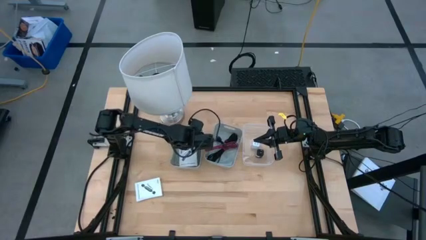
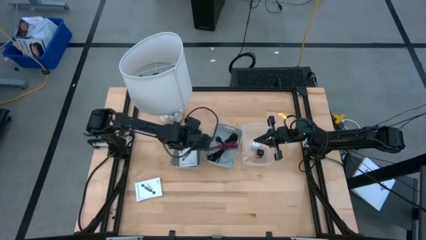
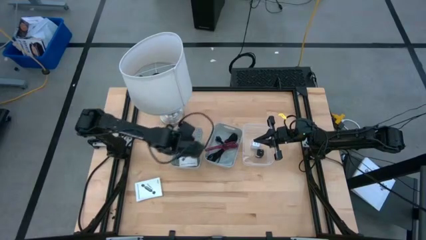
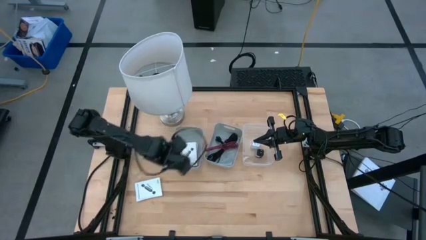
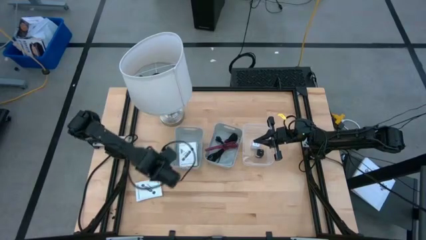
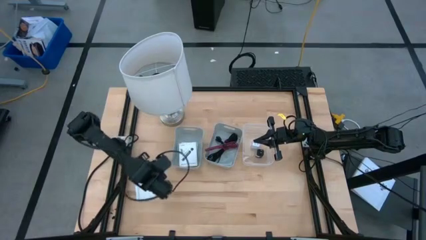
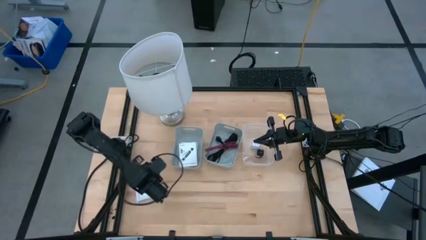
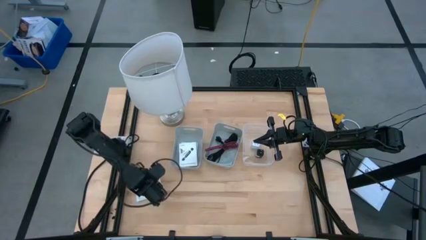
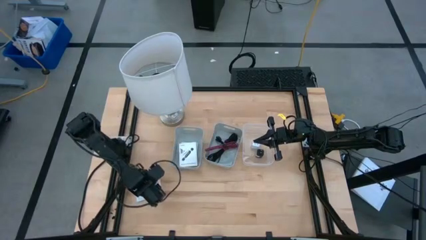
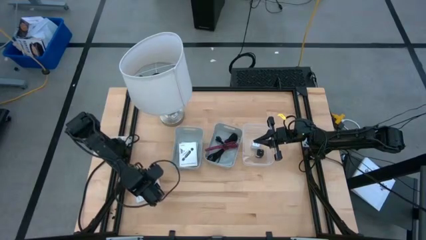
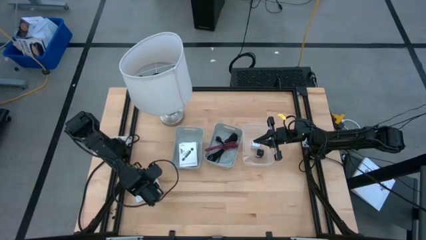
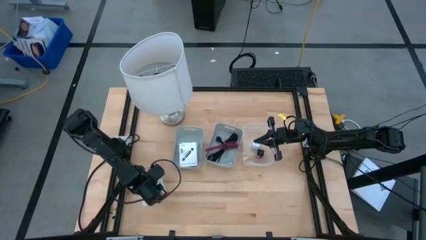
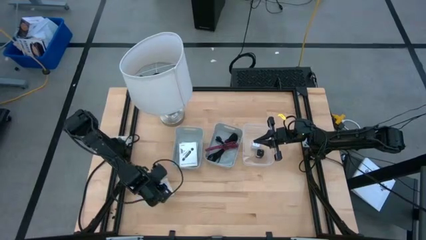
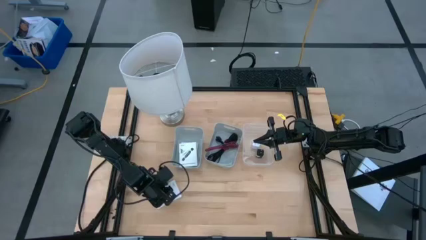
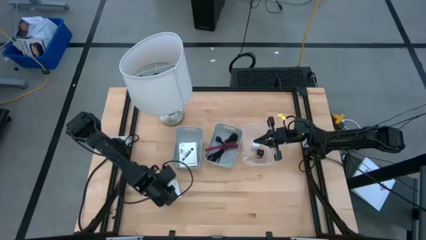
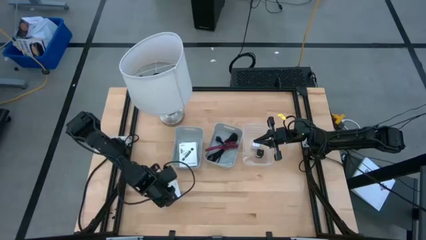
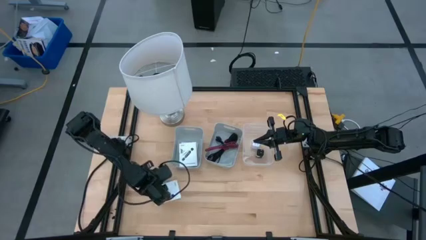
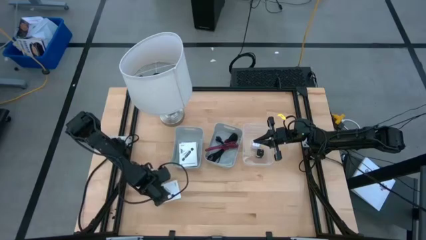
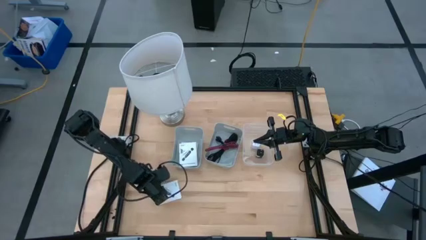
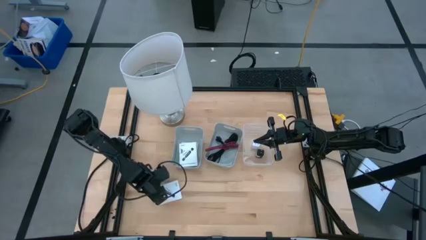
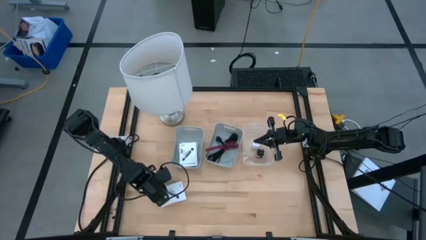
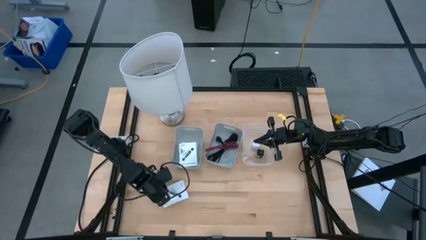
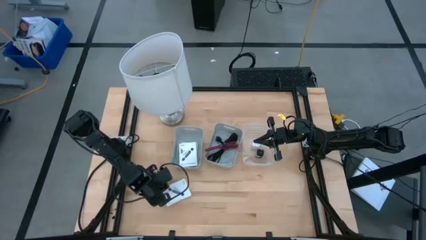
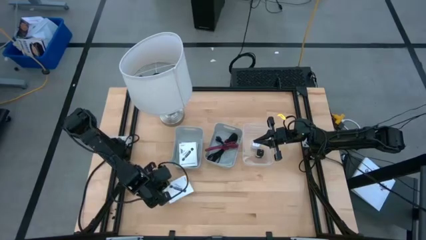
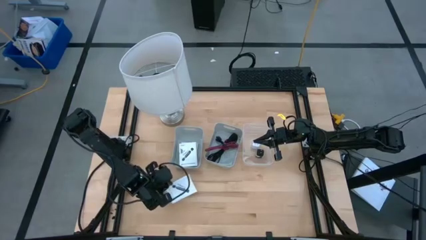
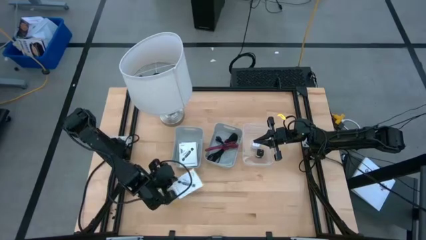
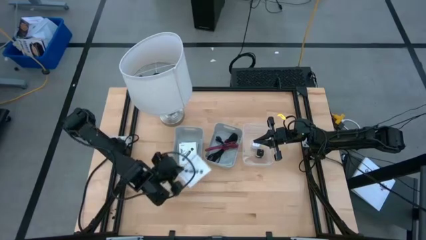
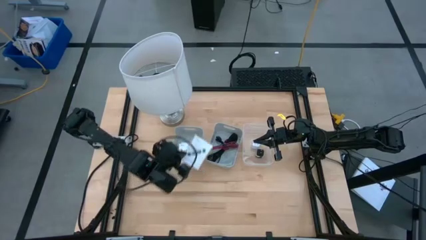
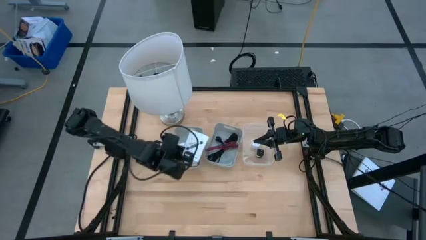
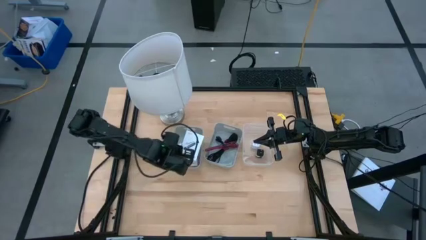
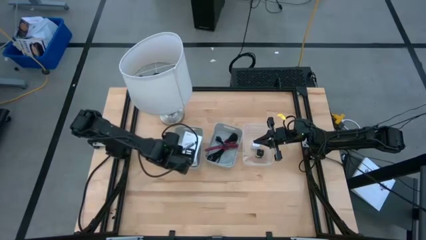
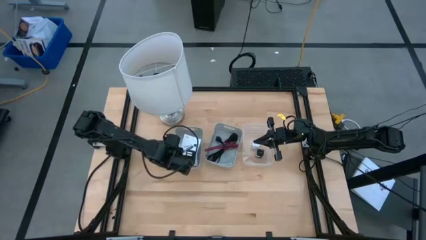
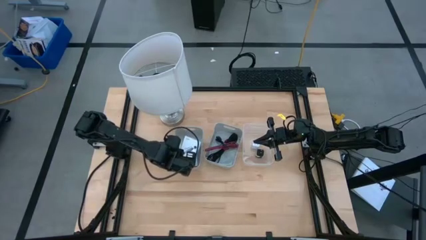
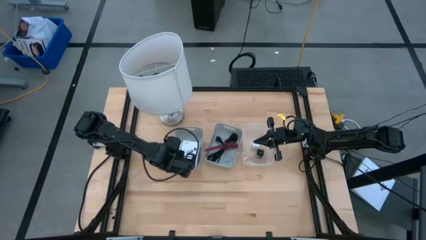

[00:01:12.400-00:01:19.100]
Task: Pick and place items into bin
Put the card reader box into the left gray bin

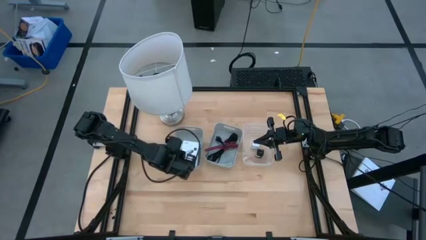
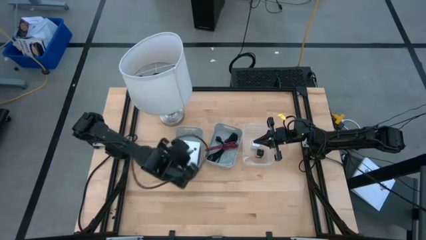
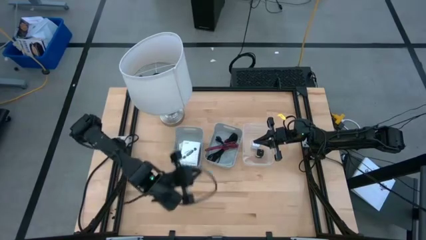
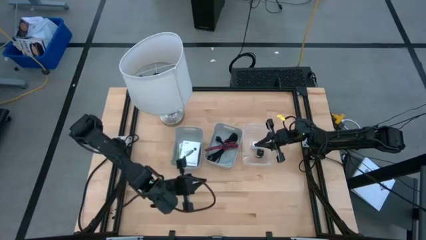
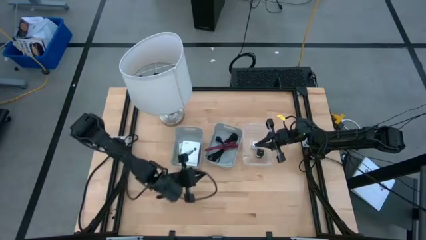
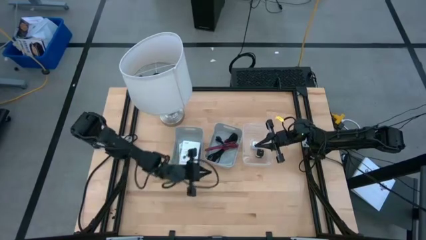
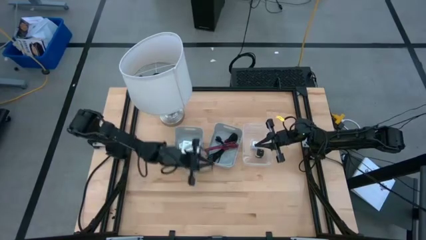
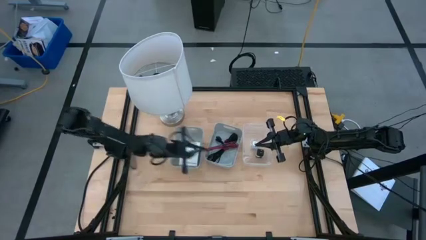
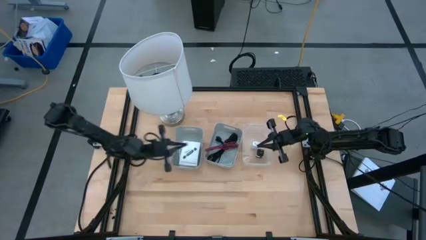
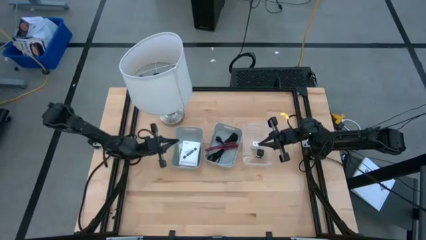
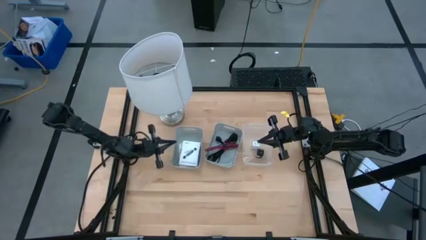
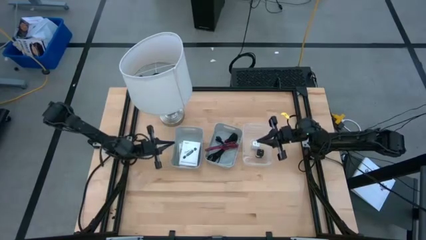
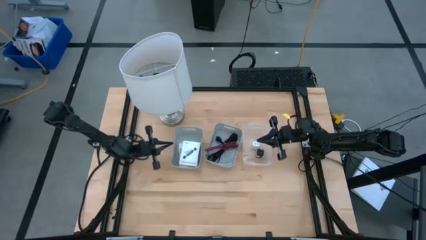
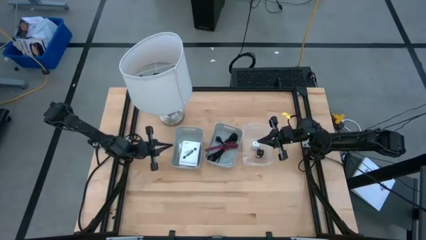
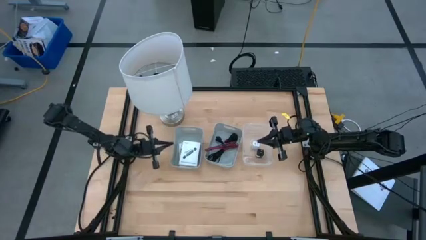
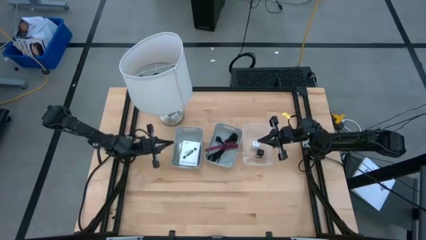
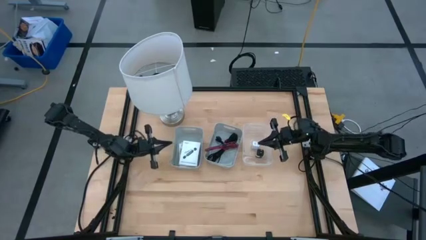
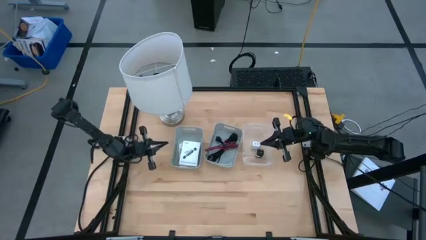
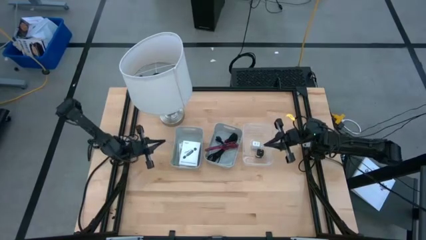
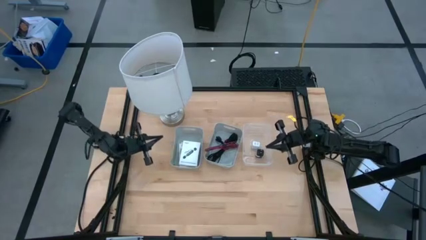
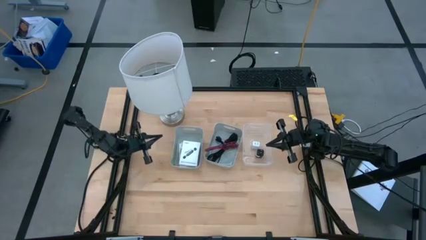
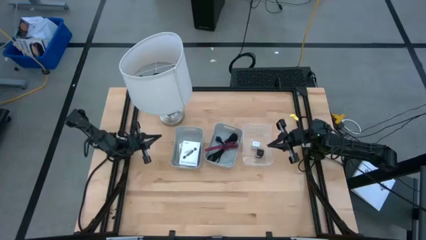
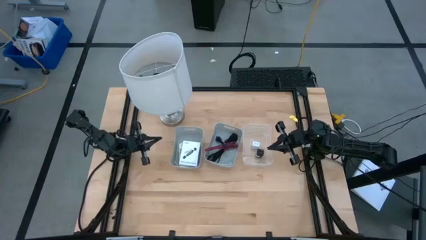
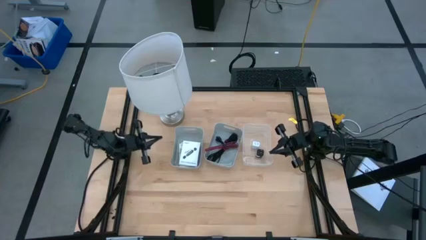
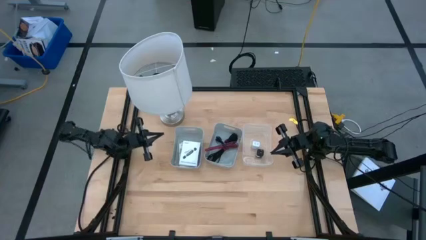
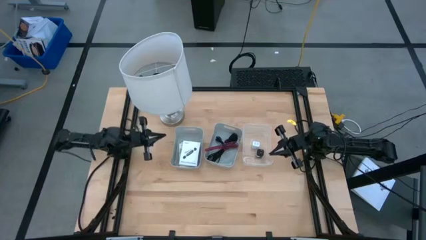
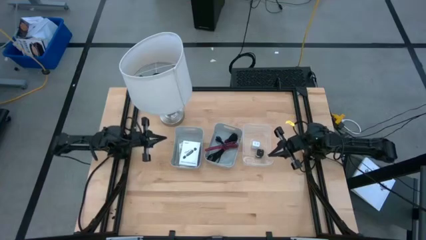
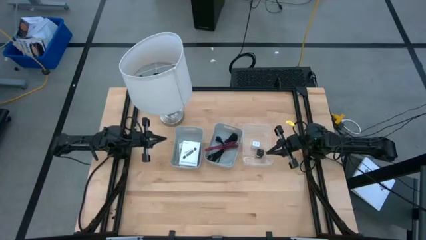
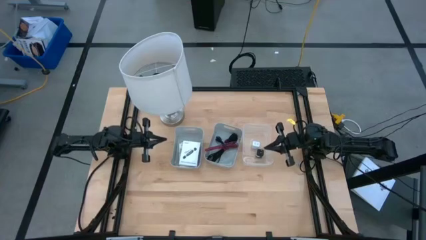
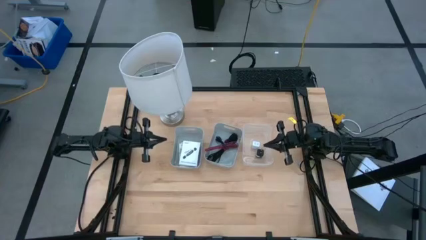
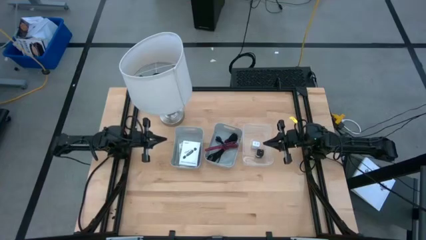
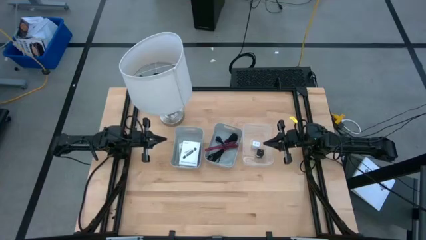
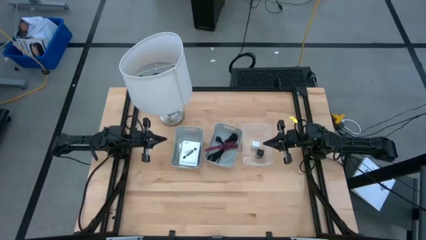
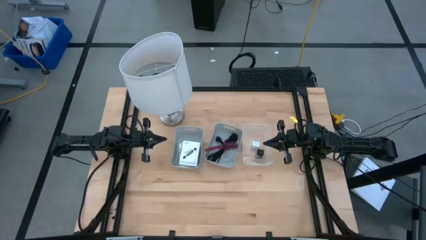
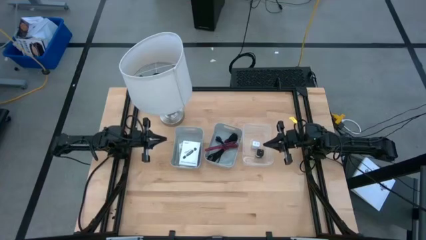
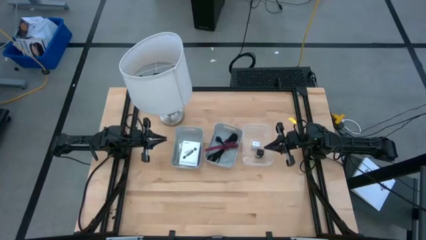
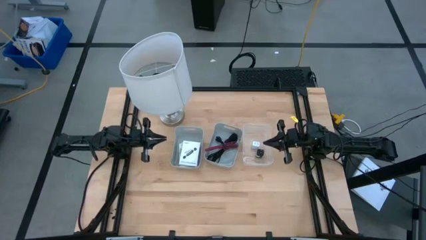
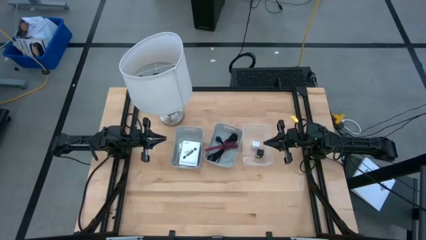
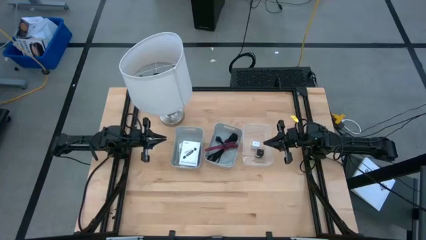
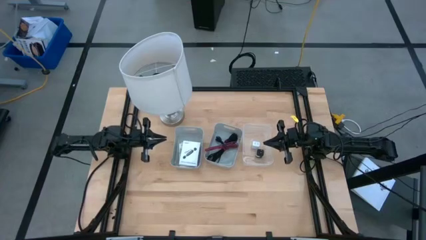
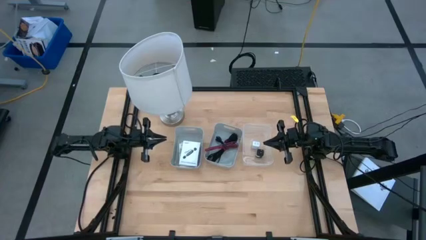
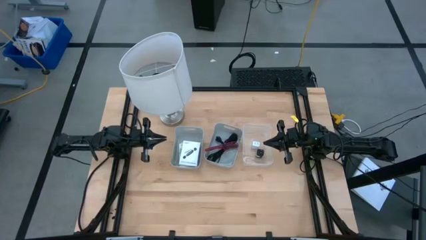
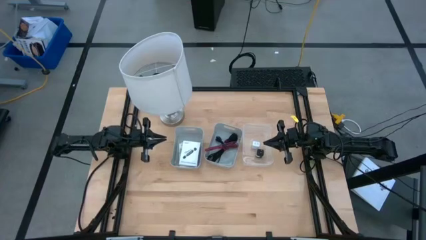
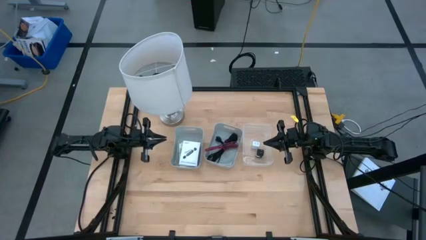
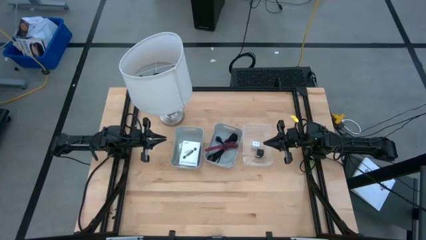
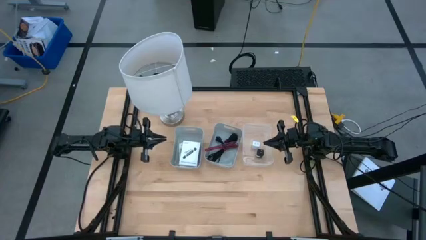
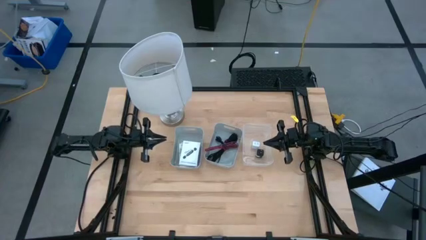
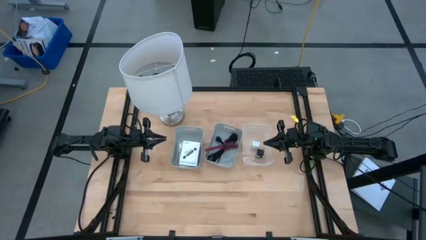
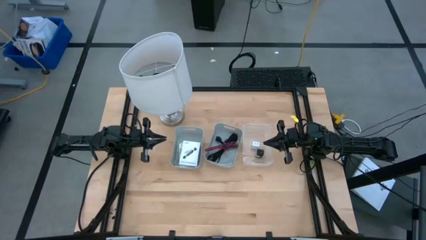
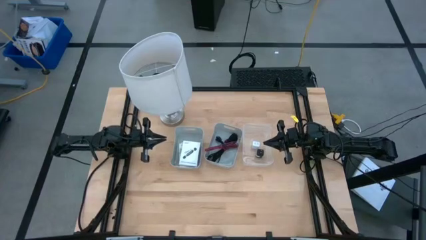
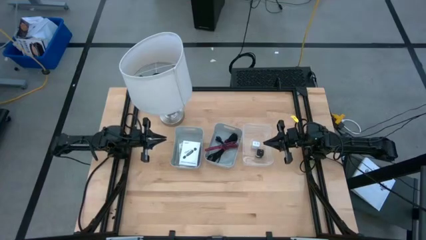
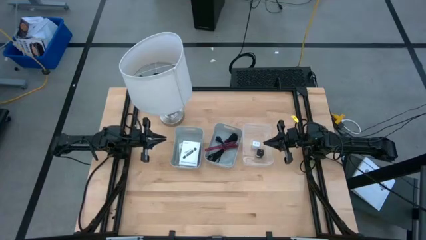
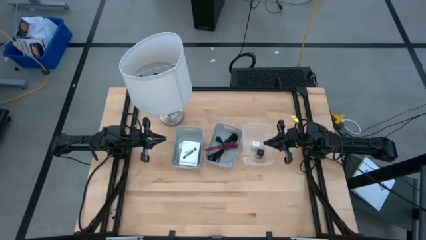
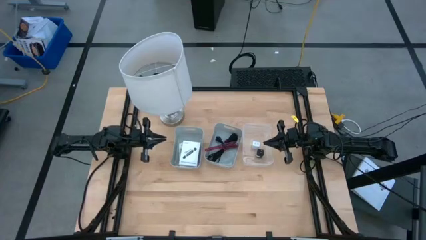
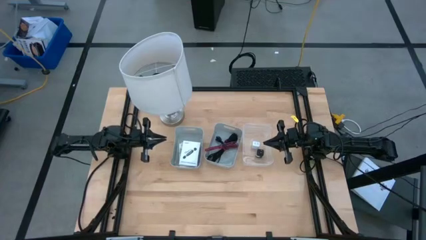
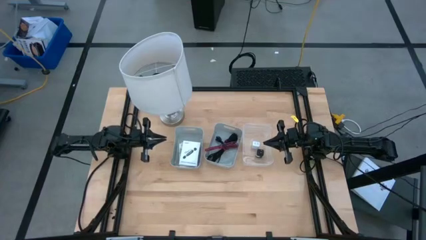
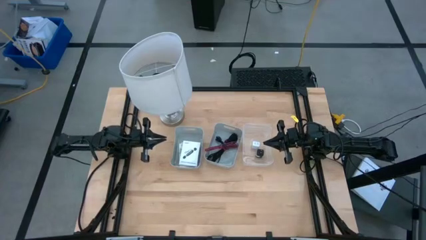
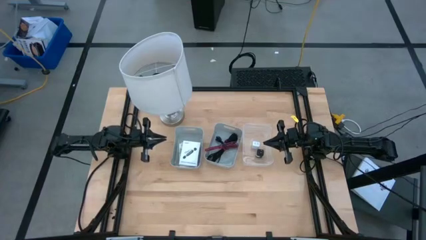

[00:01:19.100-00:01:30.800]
Return to Home Position
